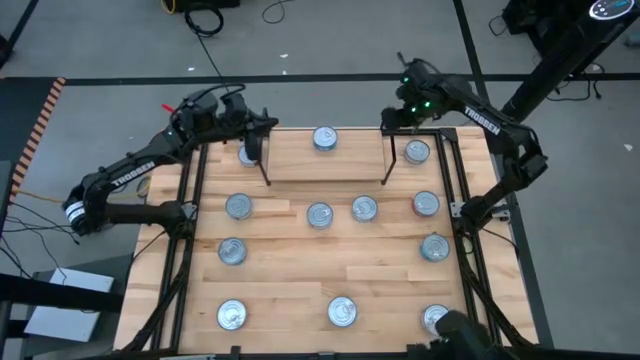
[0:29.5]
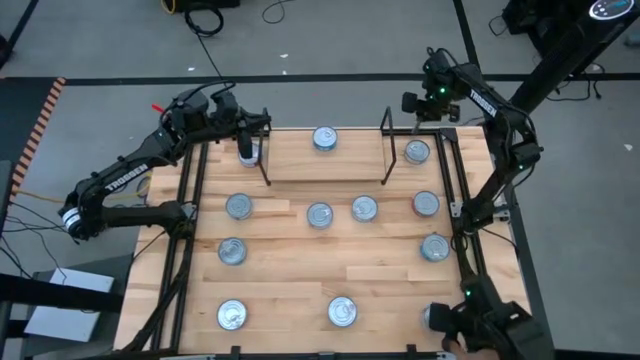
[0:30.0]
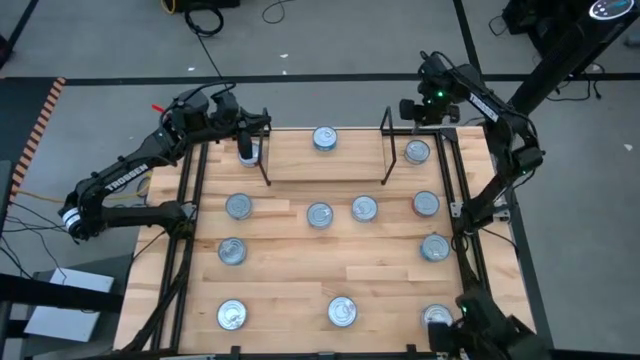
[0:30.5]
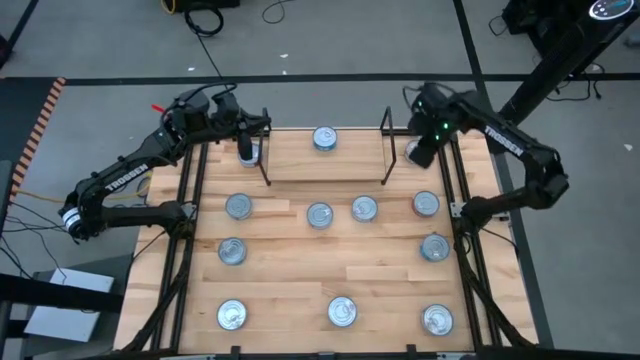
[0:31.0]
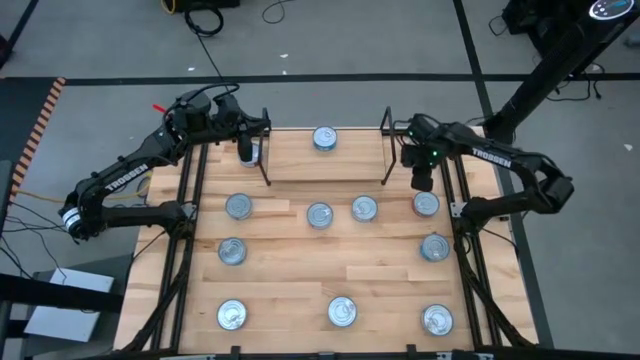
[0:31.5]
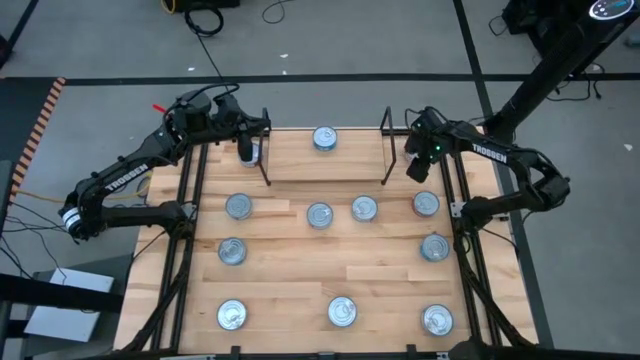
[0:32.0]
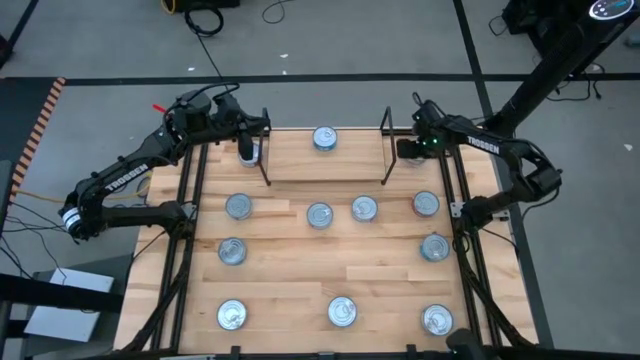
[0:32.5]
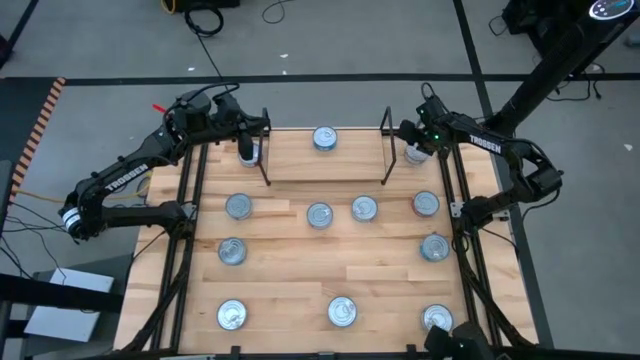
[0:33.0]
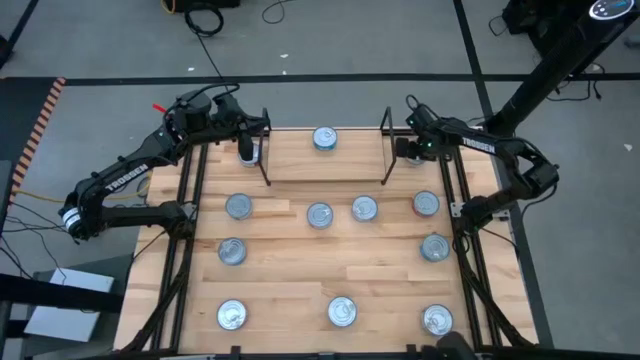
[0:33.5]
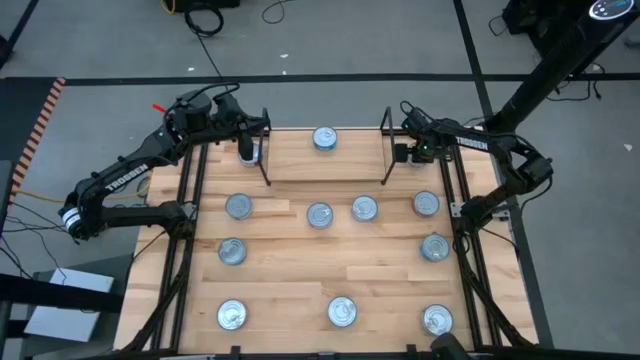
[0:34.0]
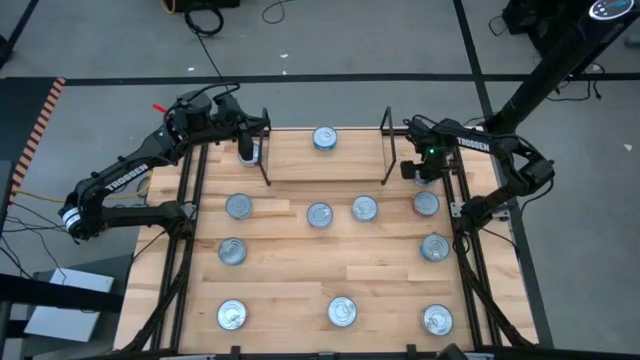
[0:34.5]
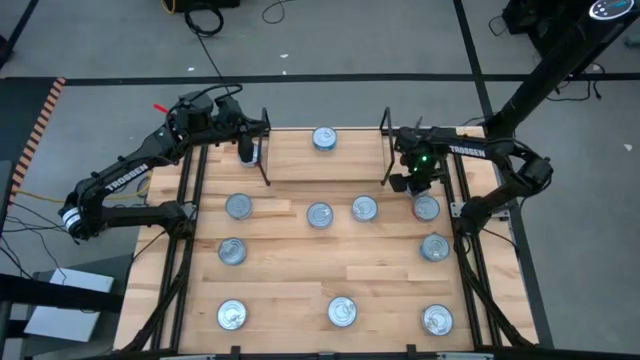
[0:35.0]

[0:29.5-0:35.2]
Task: Stack canned seafood by type on shelf
Adjust the red tuna can

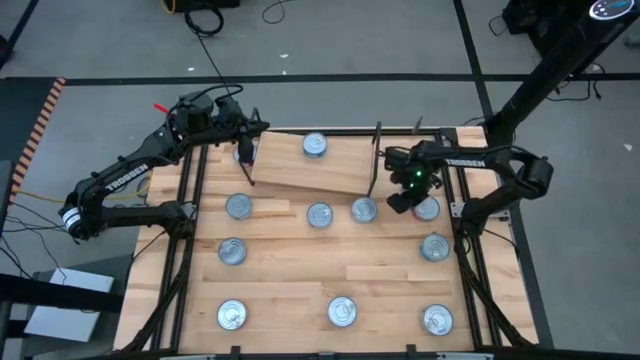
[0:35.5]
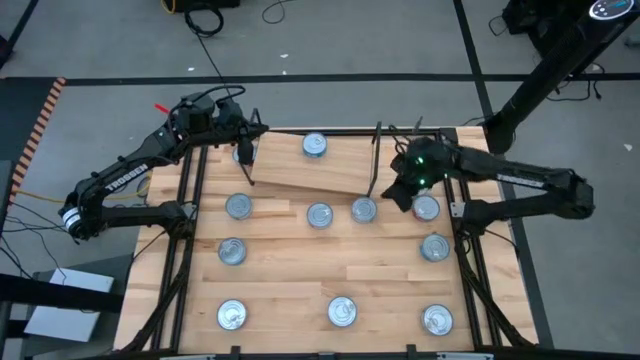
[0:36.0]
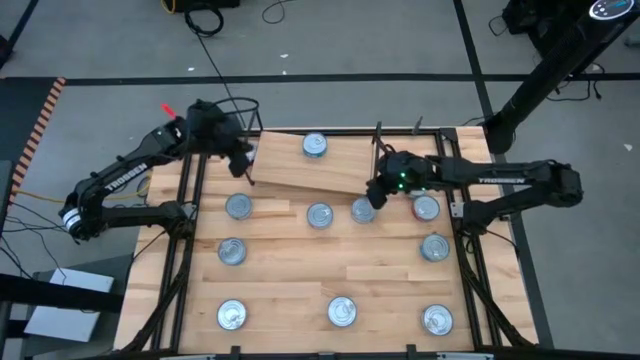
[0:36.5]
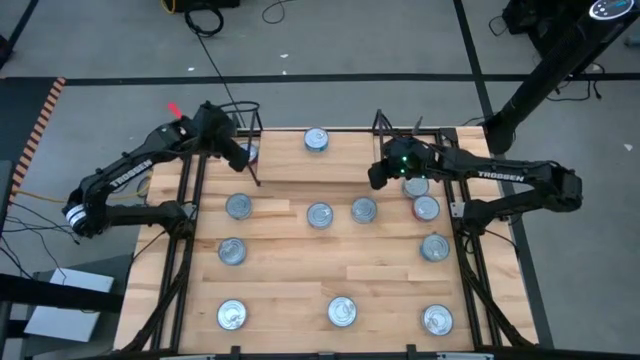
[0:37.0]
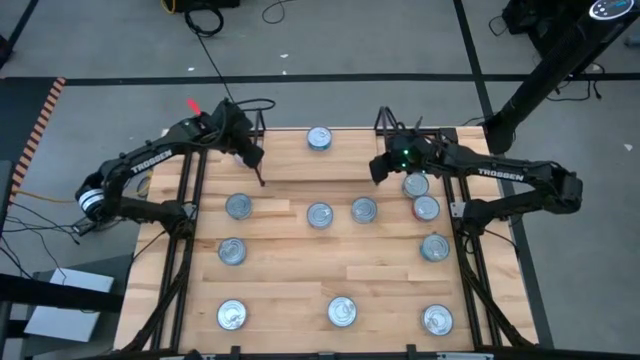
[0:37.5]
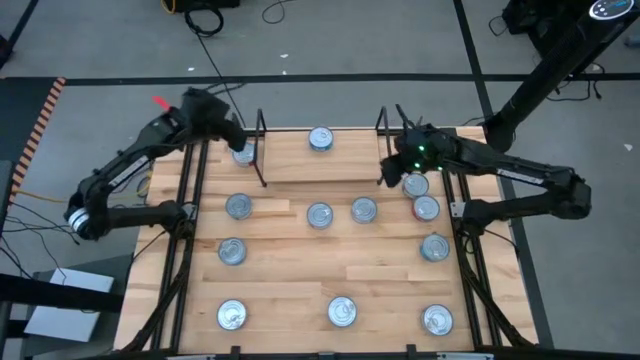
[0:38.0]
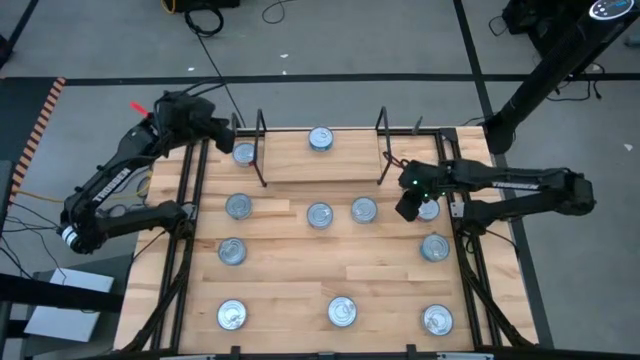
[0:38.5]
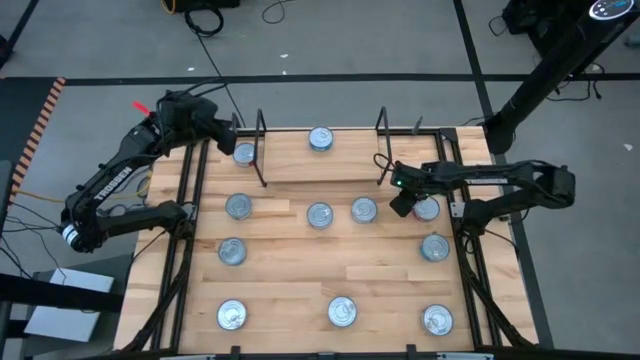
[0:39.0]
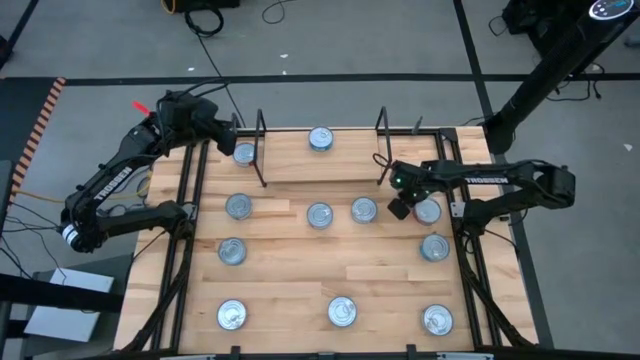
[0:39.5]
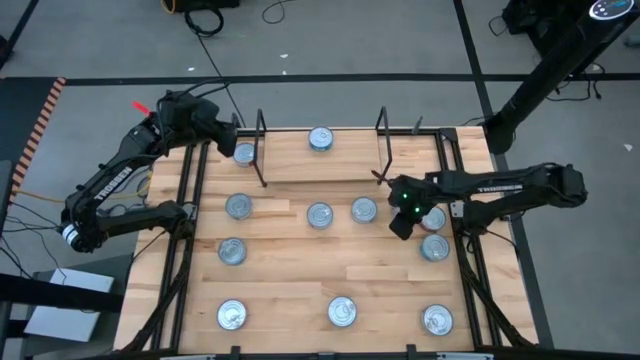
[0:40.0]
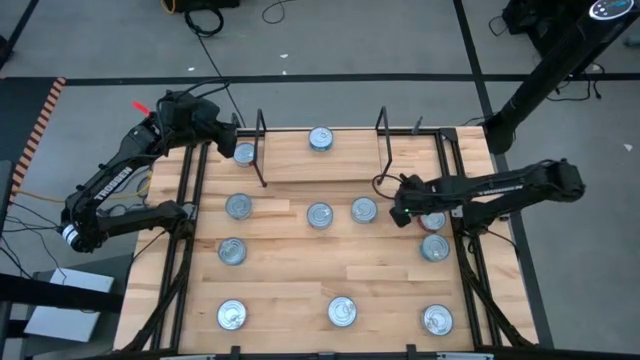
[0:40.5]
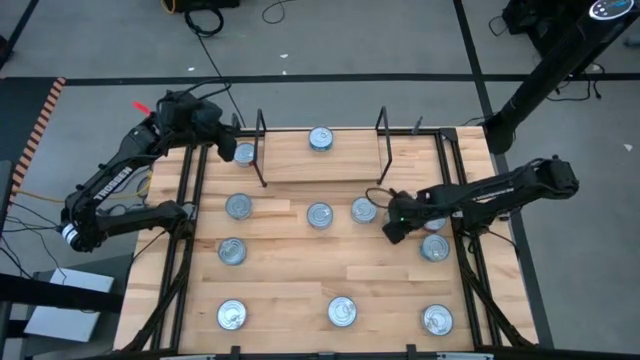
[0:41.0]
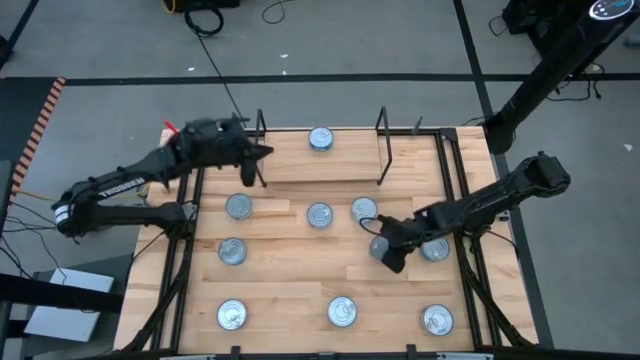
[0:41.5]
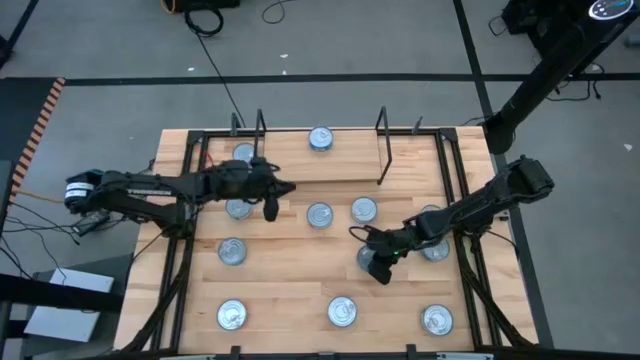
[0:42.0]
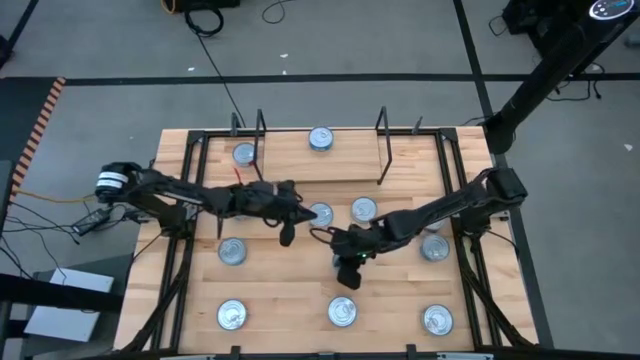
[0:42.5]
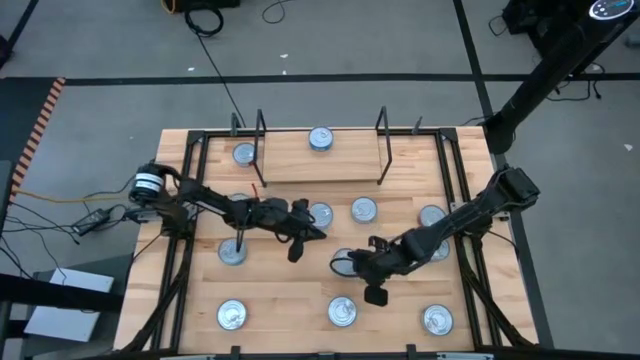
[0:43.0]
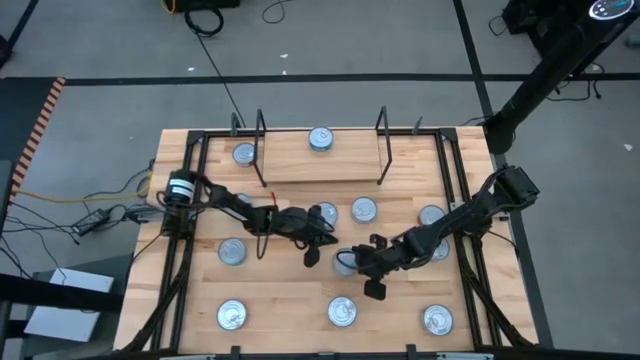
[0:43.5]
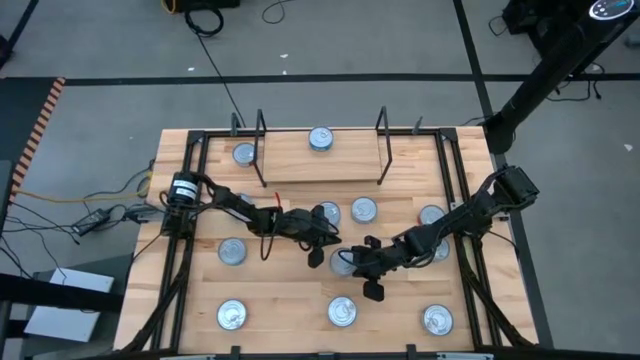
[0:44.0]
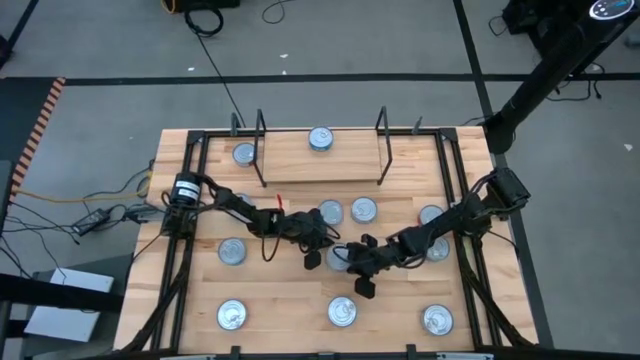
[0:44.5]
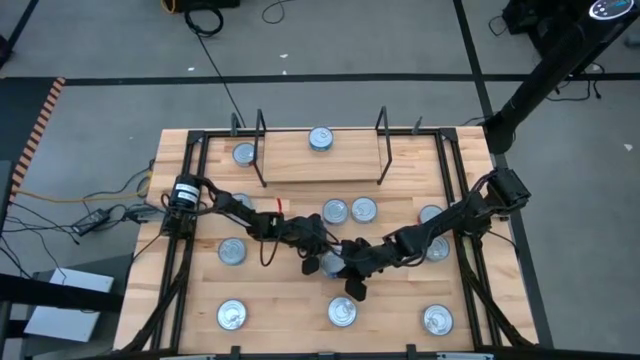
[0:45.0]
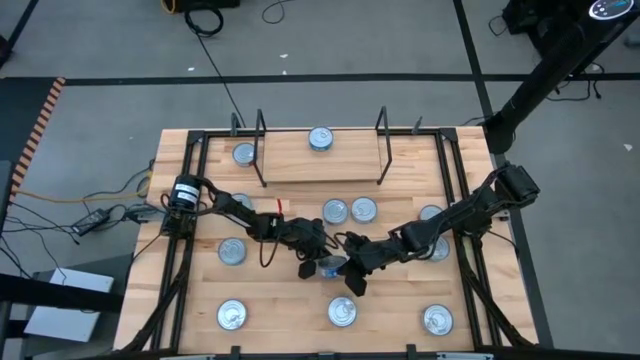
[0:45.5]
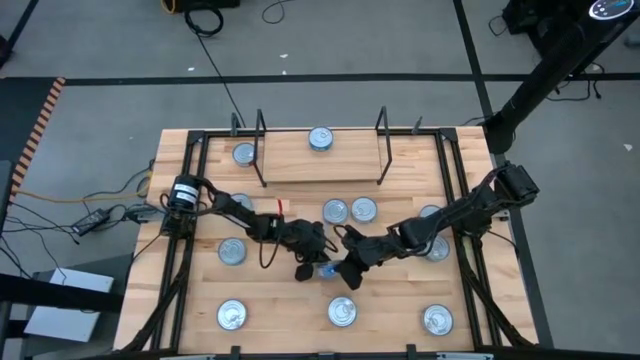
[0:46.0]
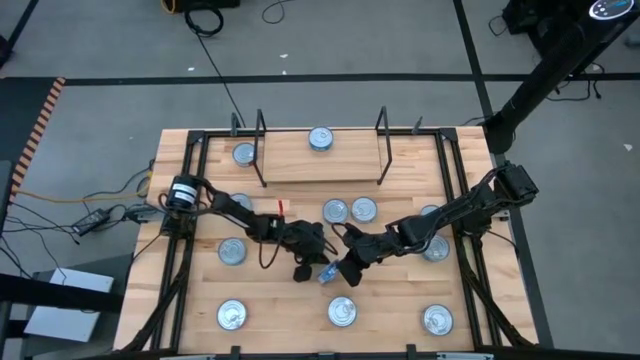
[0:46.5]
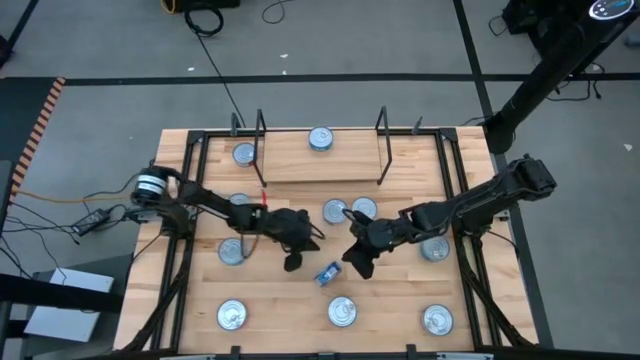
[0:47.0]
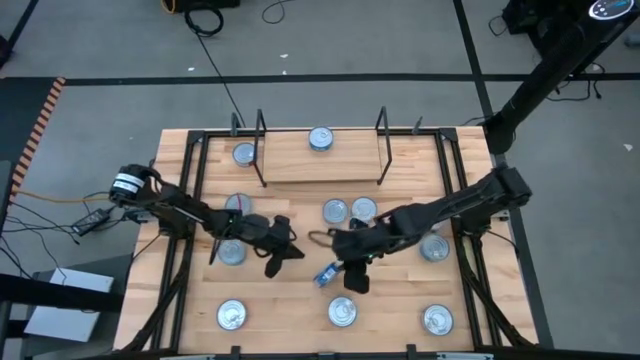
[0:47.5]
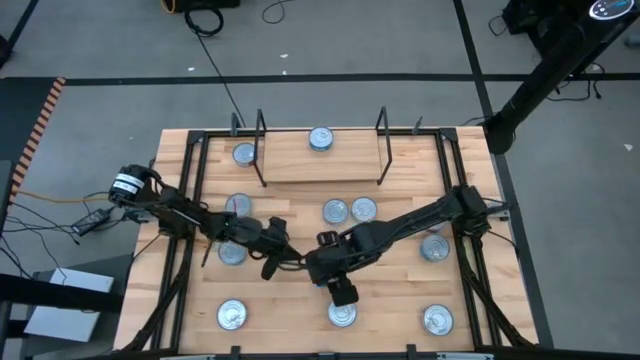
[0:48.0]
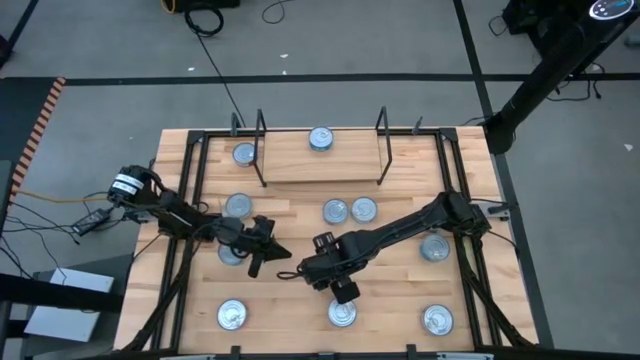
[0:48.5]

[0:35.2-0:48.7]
Adjust the shelf

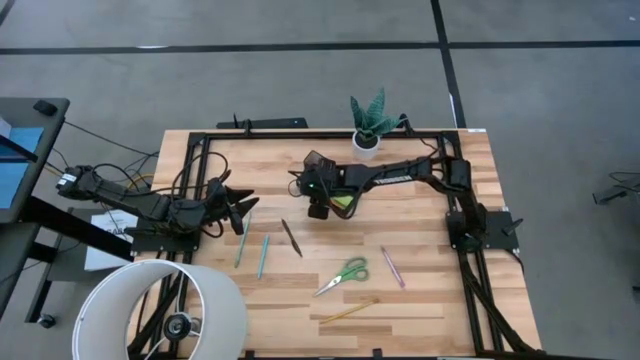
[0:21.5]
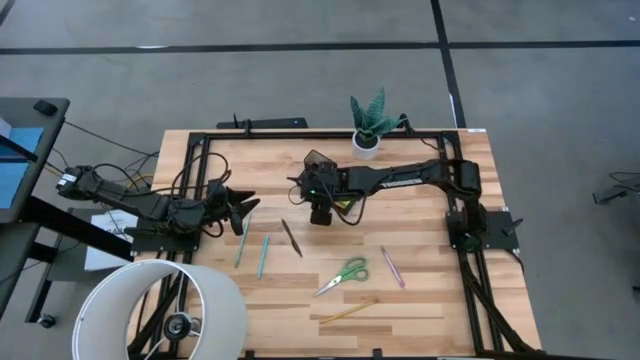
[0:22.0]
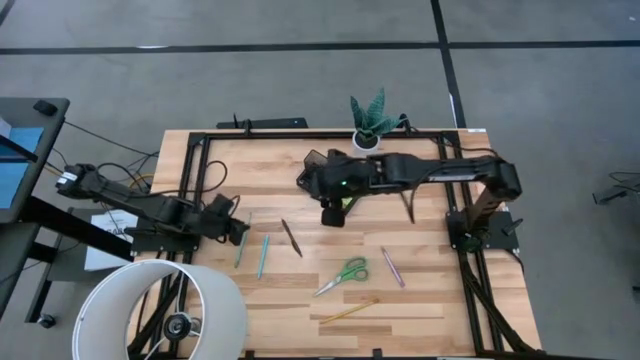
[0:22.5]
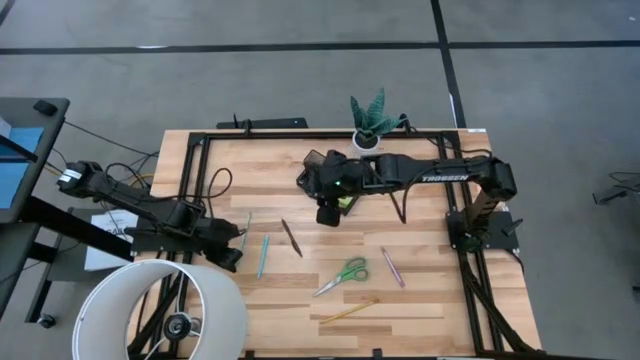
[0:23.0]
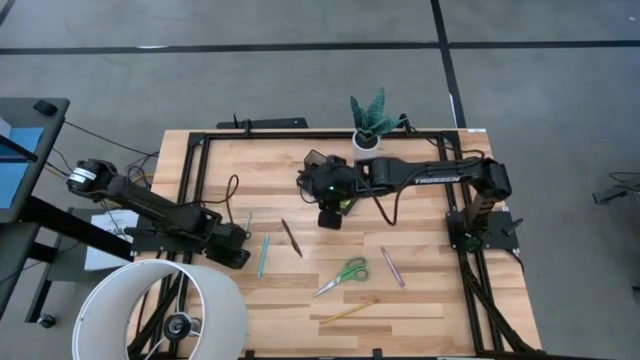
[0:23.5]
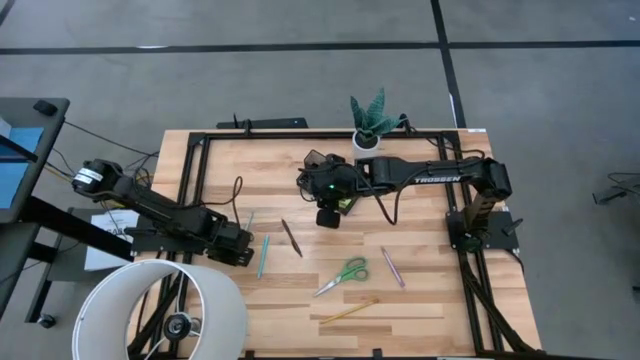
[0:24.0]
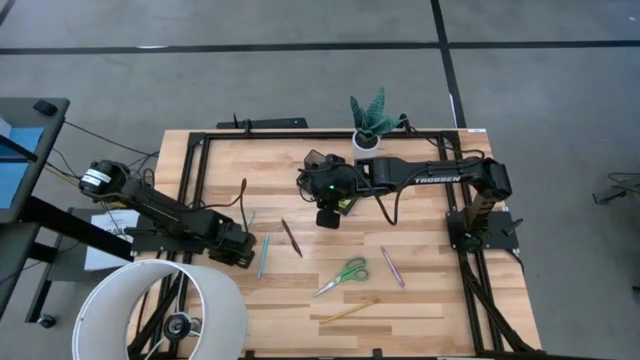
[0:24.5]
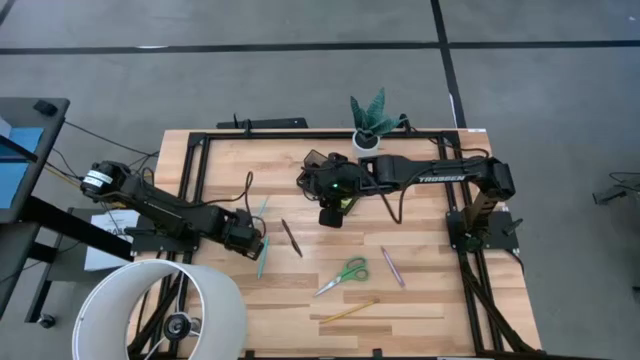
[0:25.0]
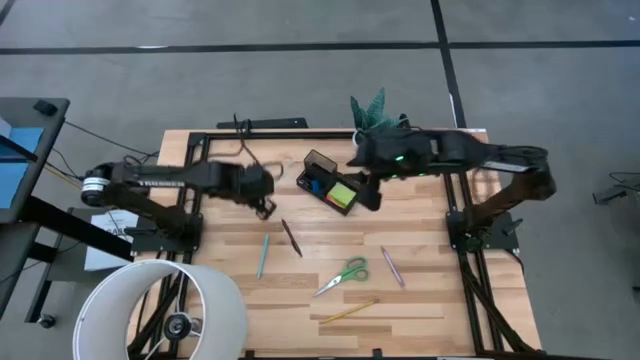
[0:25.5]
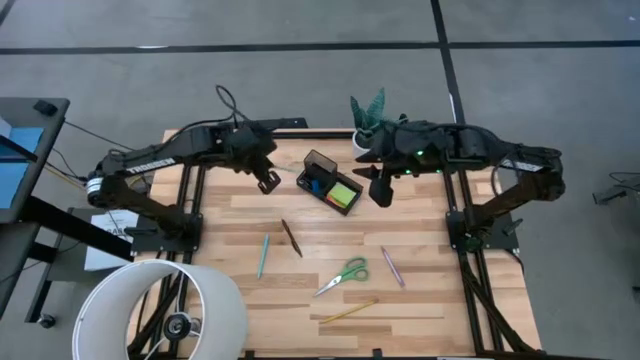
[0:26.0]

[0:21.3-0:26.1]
Task: Pick and place office supplies into organizer
Put the light blue pencil into the black desk organizer
